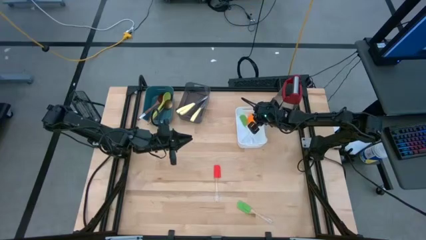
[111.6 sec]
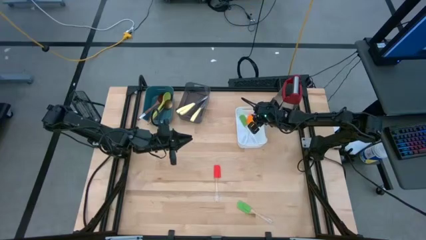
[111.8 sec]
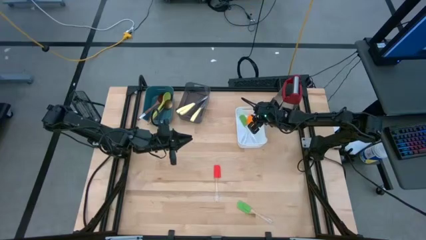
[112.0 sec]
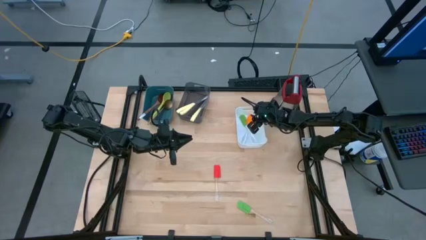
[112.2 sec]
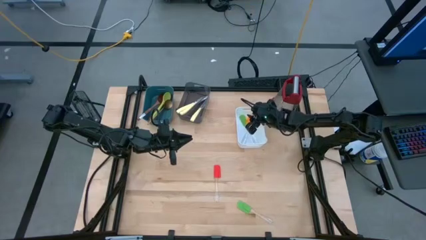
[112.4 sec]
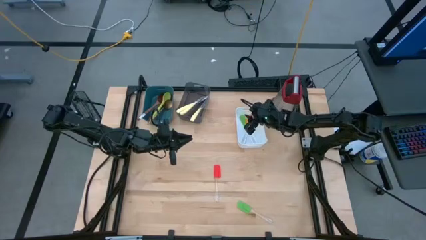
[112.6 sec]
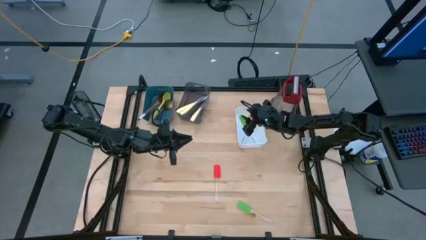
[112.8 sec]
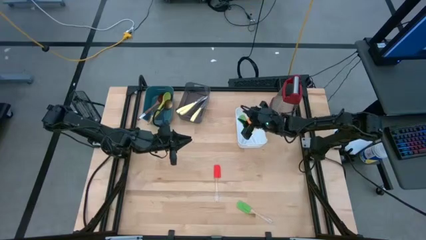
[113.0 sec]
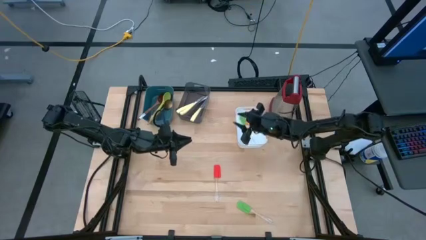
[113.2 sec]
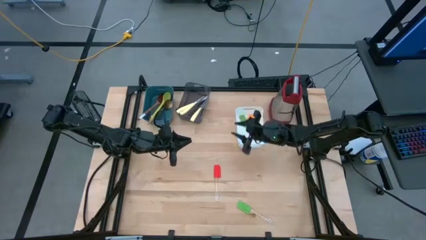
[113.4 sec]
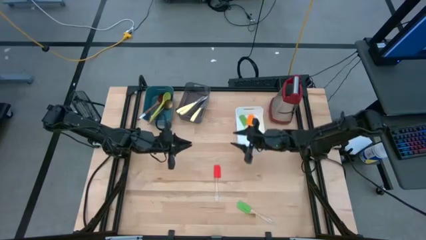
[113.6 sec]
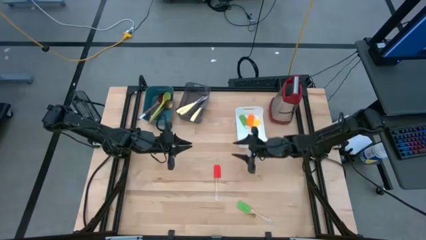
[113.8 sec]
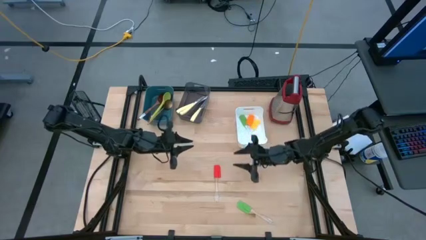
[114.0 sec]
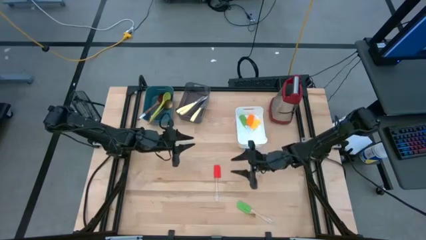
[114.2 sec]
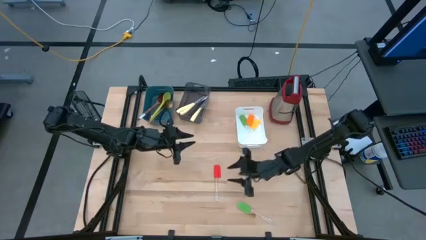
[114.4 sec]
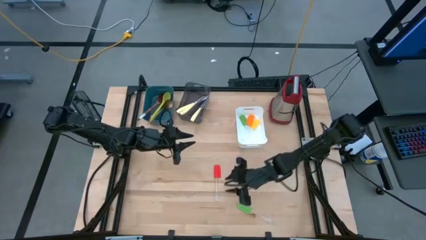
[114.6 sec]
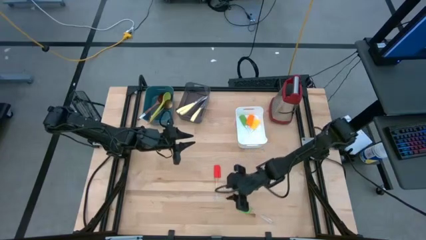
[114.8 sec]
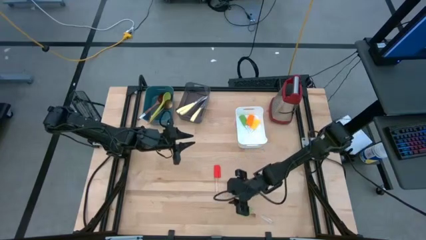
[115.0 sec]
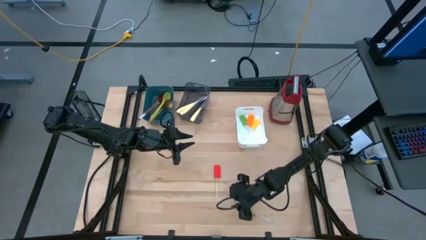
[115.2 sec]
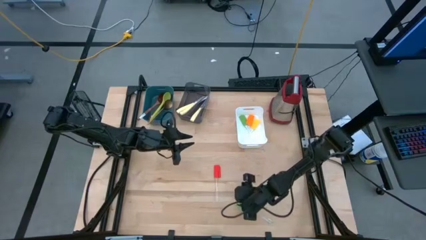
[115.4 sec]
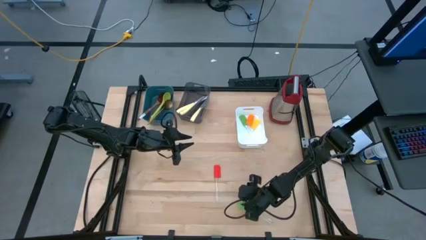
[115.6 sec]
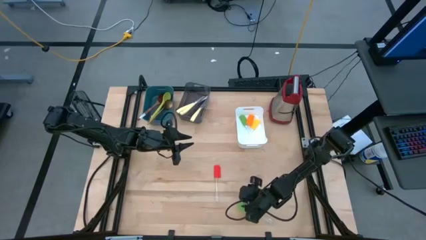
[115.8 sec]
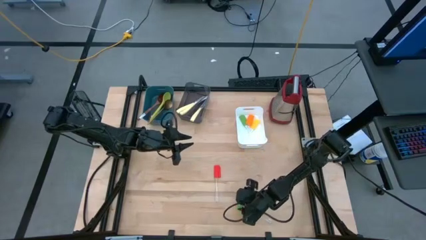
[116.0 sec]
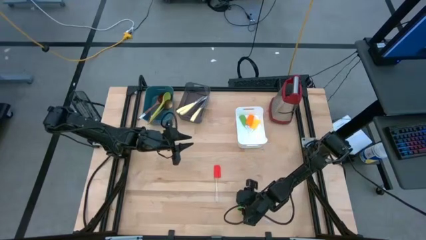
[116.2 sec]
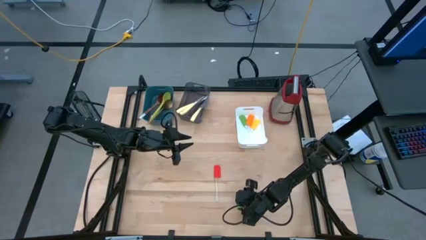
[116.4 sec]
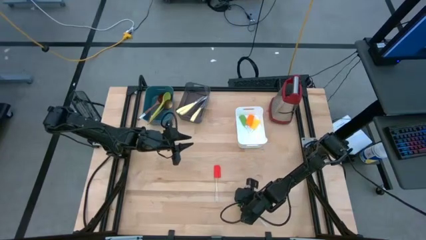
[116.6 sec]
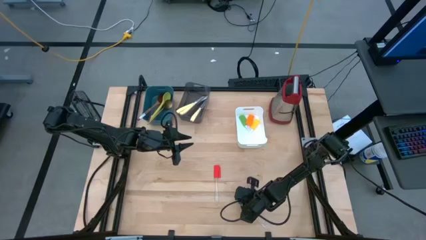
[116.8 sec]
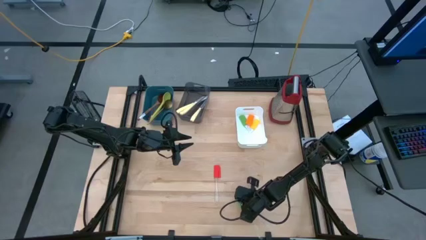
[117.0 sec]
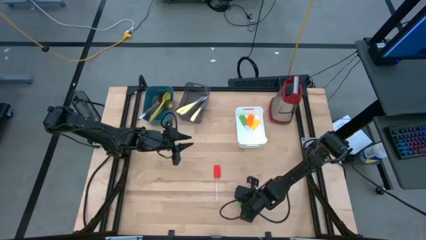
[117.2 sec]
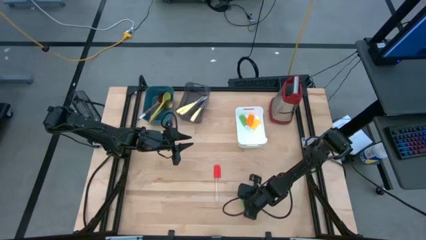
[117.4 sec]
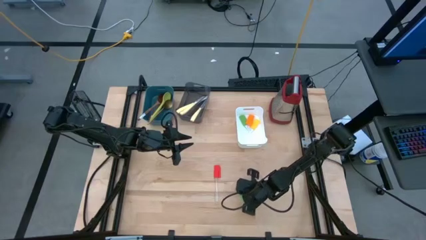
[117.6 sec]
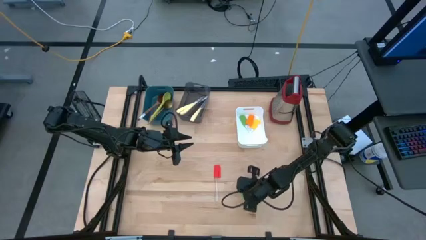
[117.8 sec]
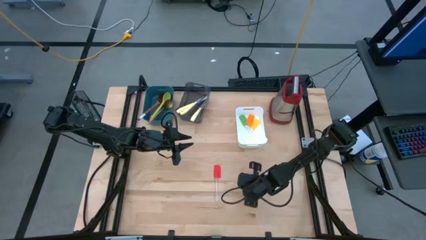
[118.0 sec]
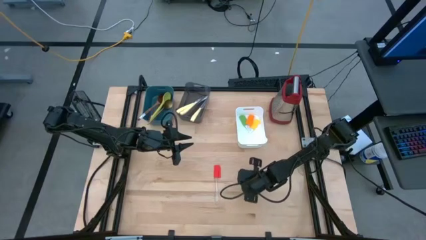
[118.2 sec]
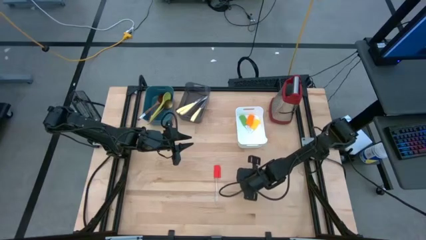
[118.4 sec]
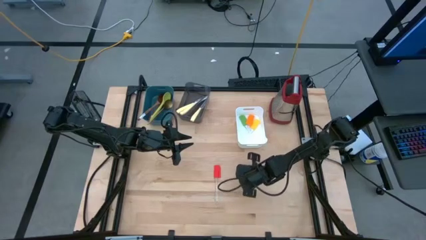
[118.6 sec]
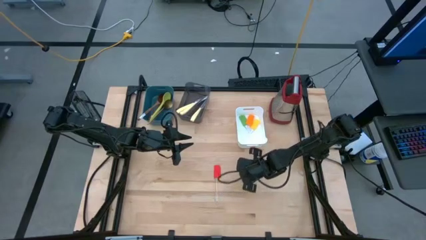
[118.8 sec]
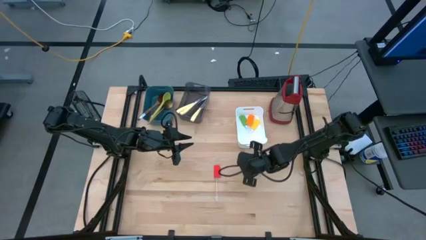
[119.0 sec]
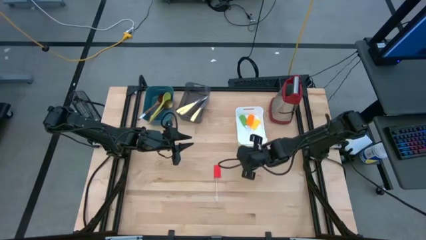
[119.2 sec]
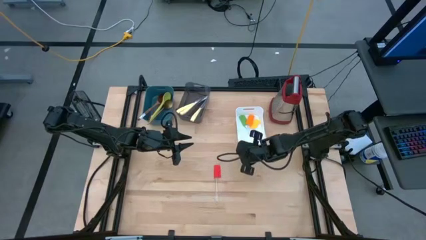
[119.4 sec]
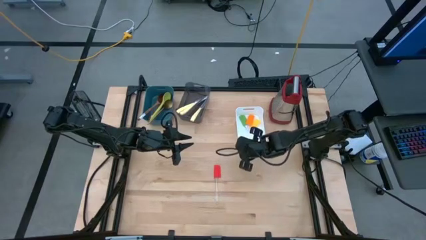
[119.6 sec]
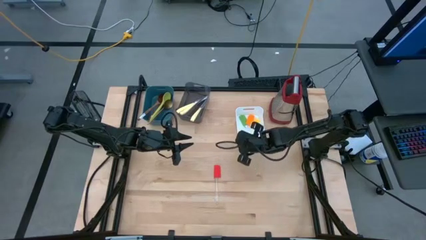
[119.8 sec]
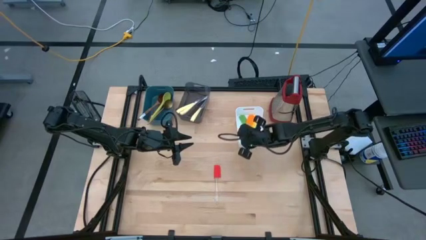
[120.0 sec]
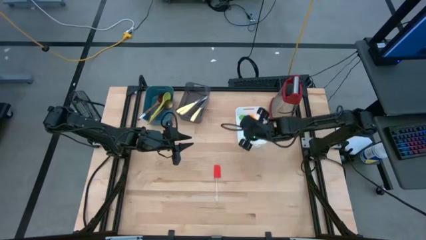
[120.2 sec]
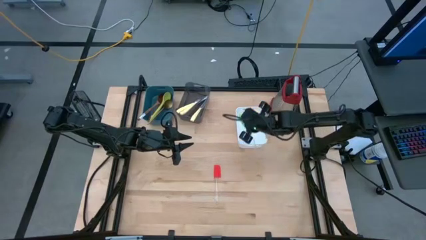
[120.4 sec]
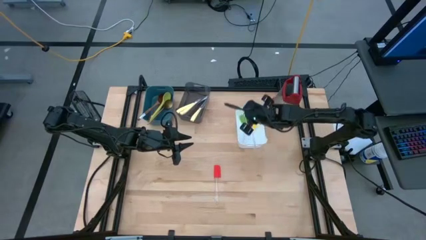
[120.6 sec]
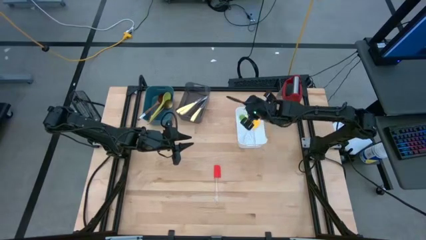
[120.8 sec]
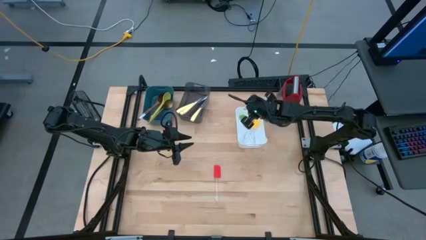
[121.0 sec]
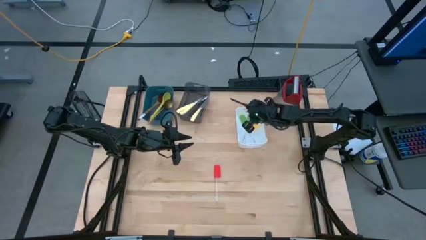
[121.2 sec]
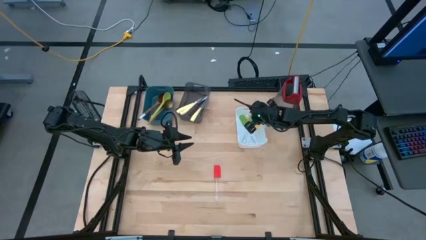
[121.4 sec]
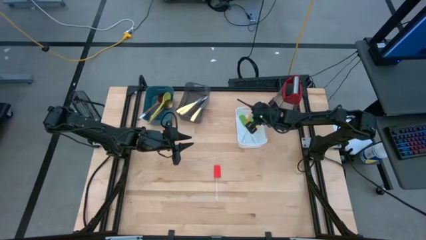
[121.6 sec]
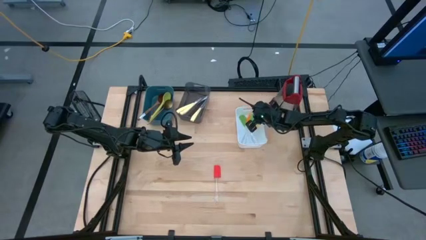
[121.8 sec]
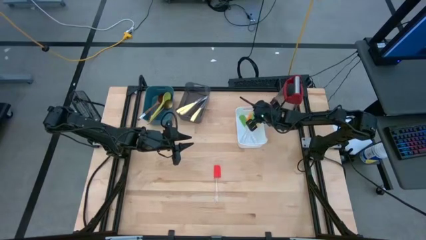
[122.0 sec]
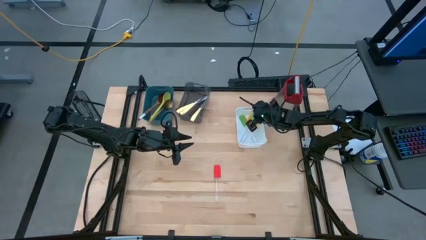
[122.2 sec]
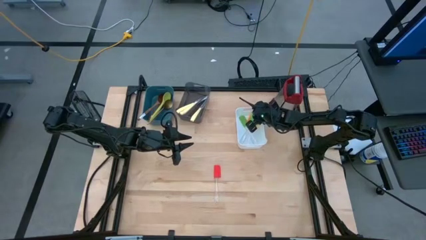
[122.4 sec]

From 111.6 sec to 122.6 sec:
Task: Pick & Place Kitchen Items
Put the green spatula into the white bin

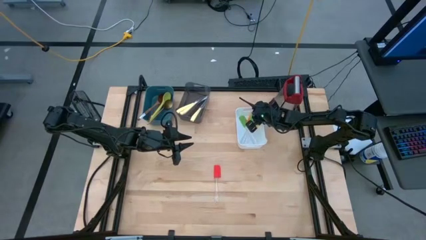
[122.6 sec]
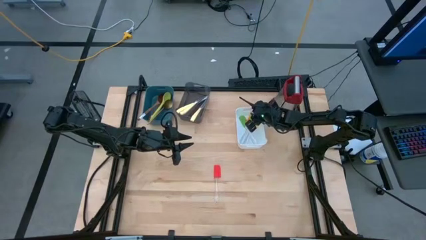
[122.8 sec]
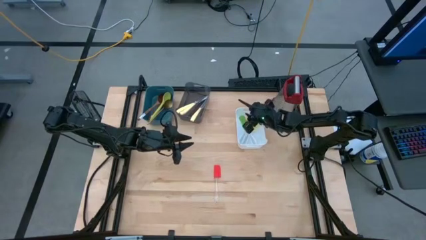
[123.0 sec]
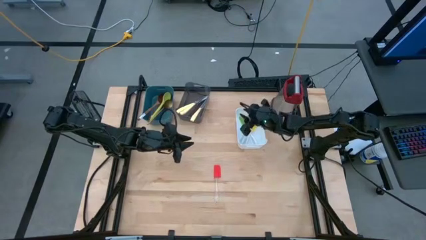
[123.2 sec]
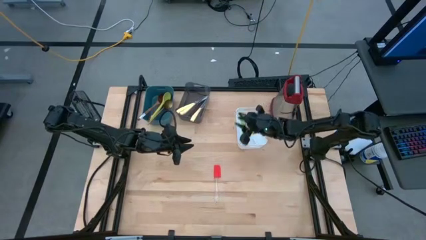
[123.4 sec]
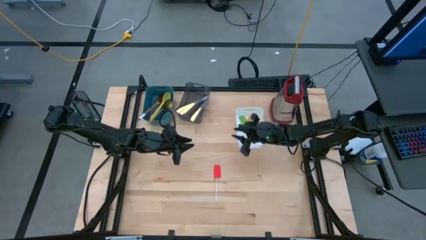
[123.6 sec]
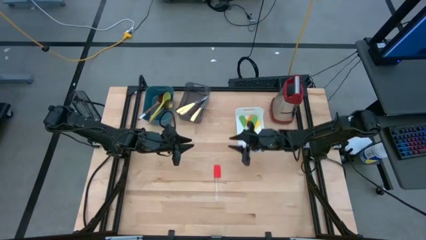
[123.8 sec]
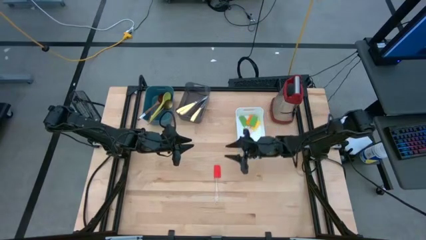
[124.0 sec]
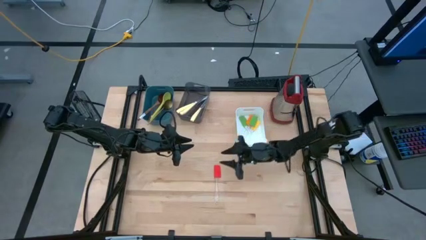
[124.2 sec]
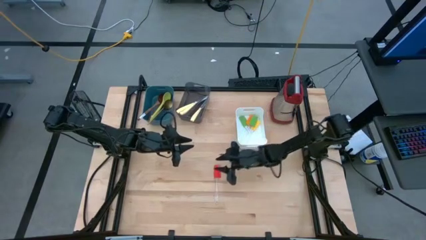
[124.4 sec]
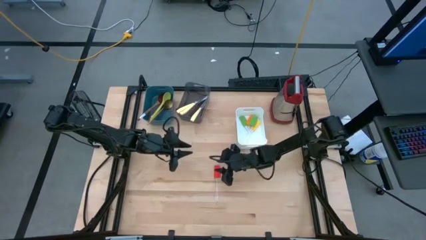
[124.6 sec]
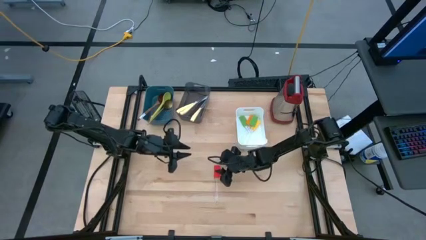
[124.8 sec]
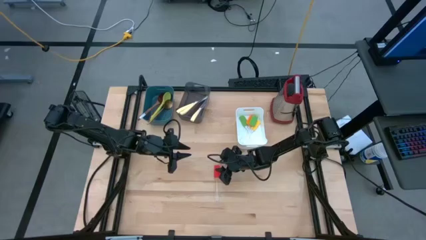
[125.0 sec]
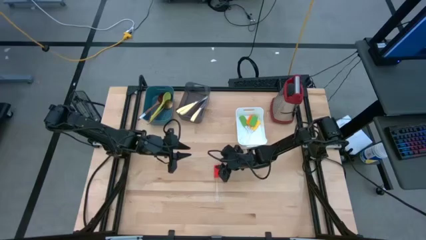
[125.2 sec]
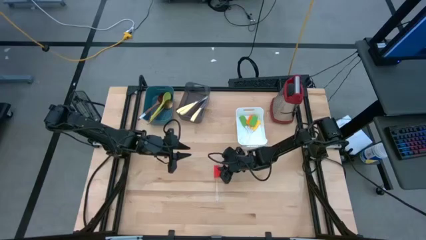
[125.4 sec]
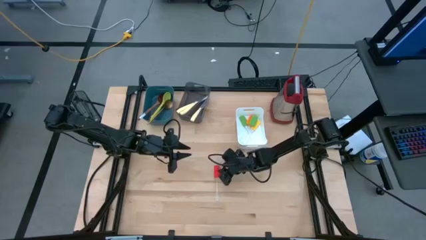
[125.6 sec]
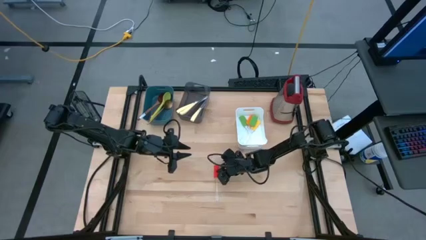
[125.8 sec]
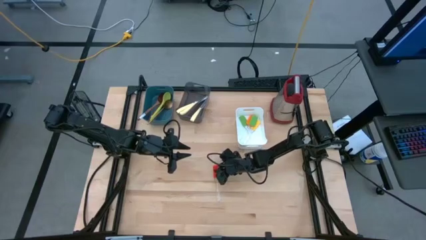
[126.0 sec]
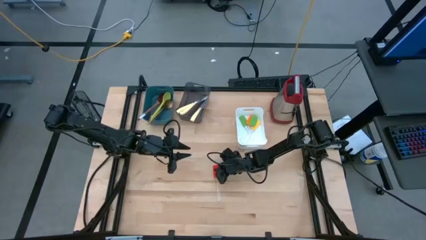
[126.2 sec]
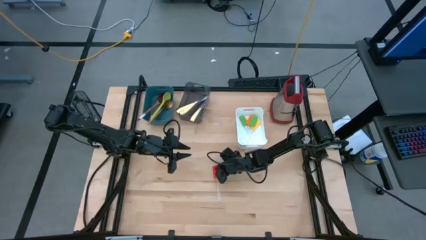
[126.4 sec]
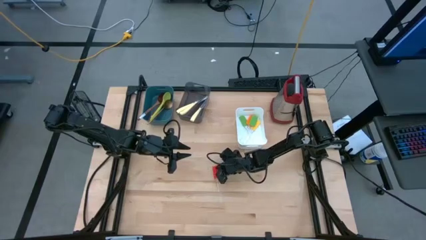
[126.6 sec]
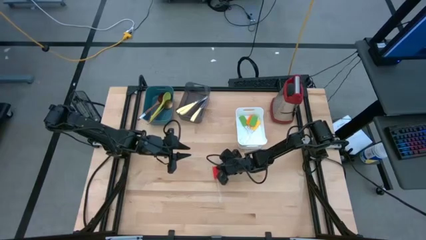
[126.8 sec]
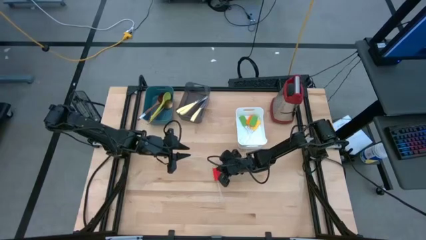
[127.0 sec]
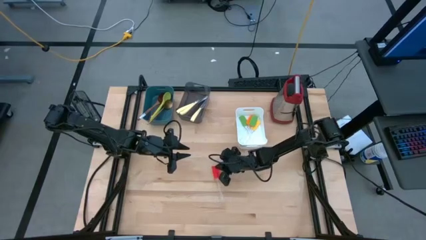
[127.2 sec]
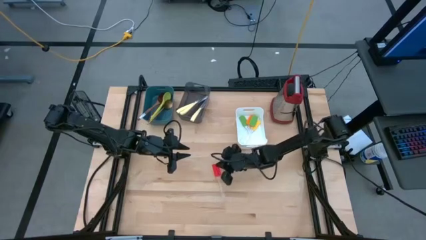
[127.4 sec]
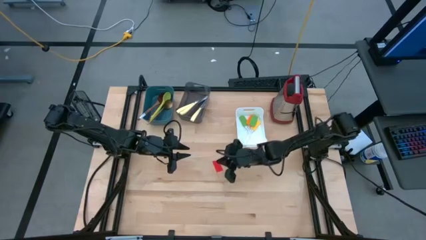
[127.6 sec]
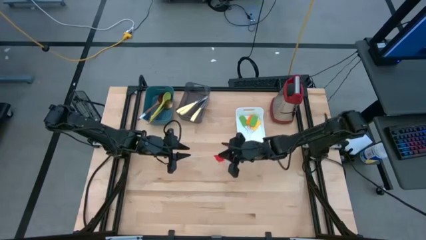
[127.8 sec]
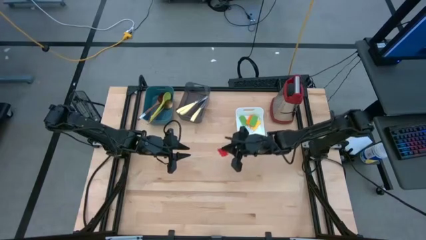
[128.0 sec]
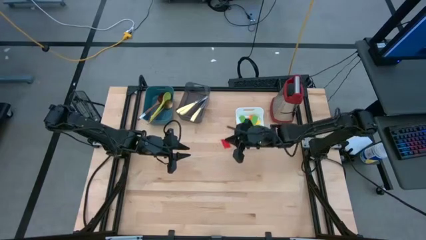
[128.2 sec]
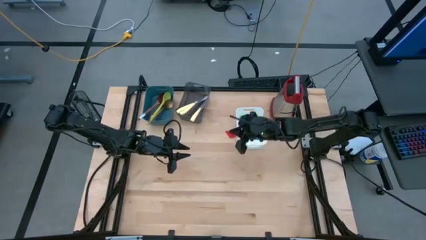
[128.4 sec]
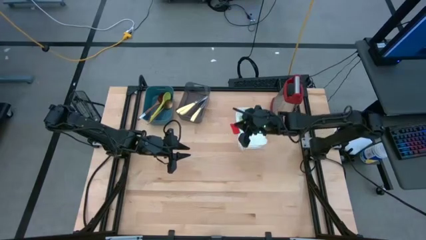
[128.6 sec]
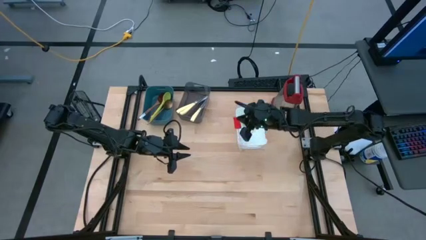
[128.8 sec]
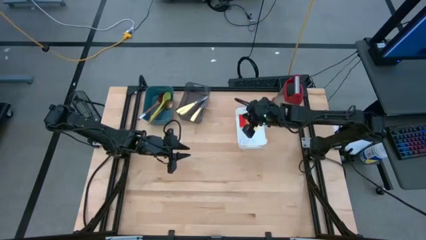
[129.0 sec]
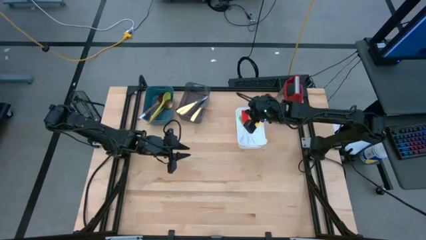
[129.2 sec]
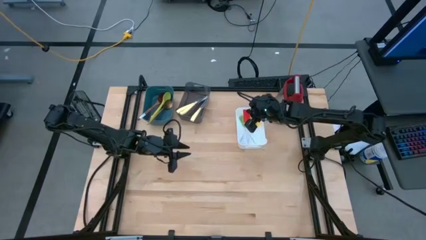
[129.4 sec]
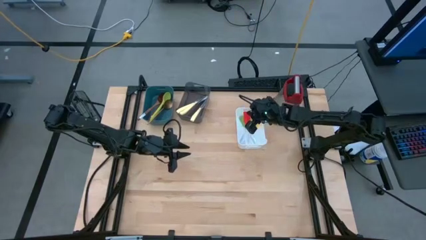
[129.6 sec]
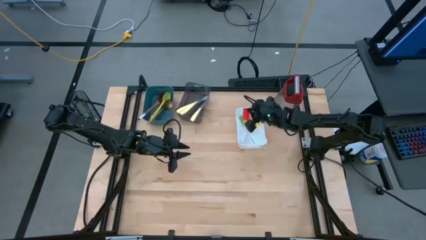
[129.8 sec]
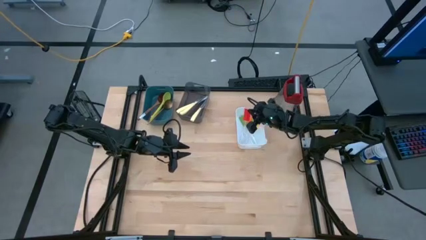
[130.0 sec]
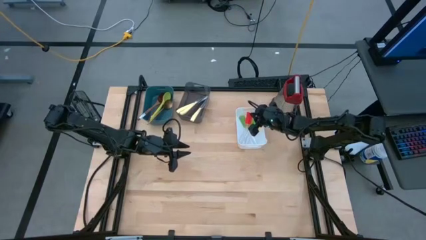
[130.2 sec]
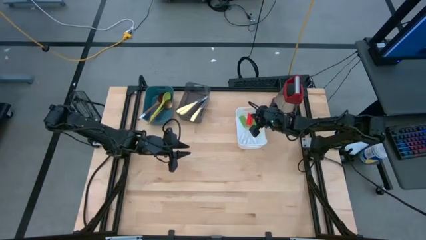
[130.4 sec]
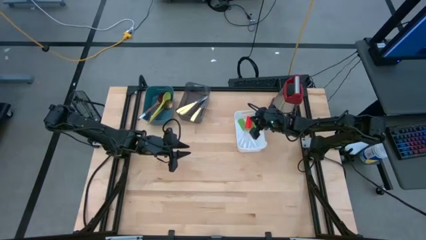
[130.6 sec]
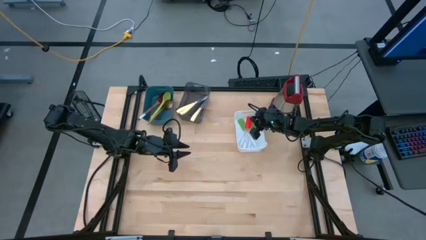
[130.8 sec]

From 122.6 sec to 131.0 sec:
Put the red spatula into the white bin
